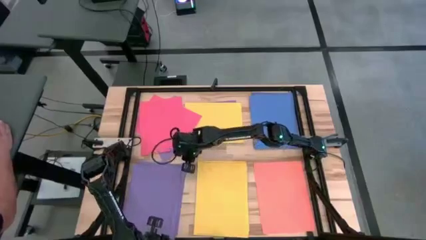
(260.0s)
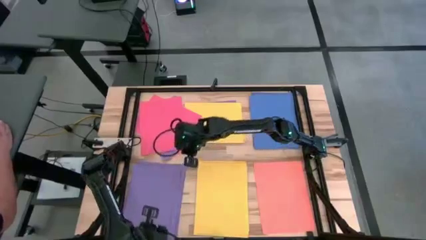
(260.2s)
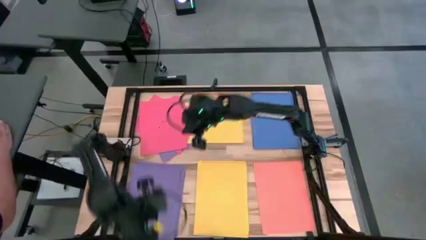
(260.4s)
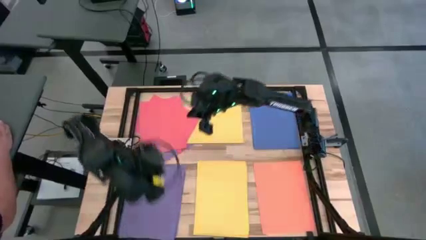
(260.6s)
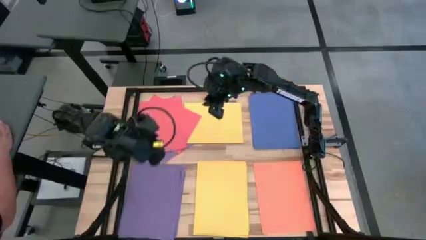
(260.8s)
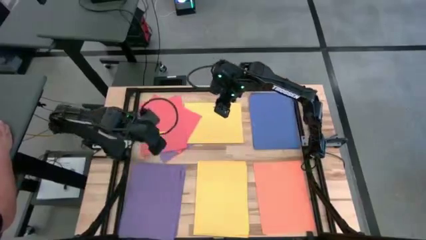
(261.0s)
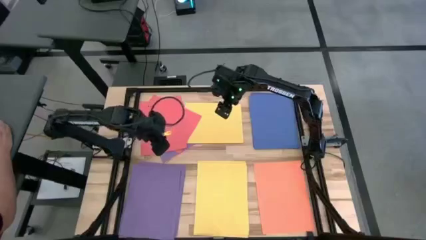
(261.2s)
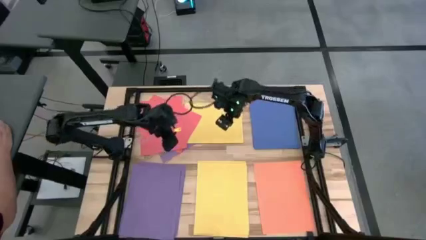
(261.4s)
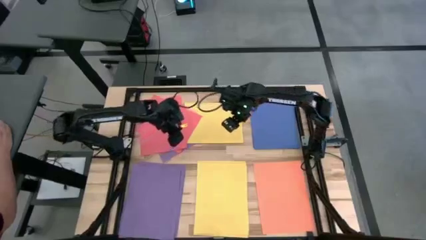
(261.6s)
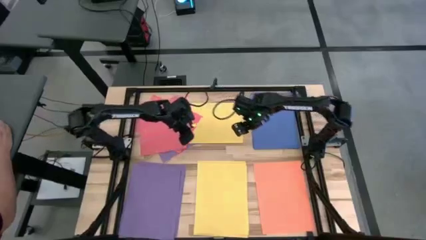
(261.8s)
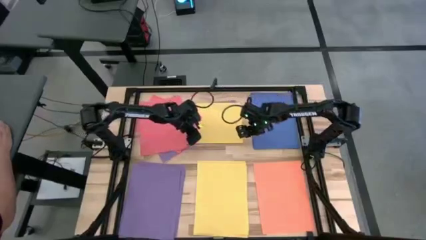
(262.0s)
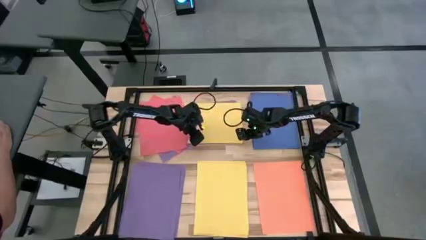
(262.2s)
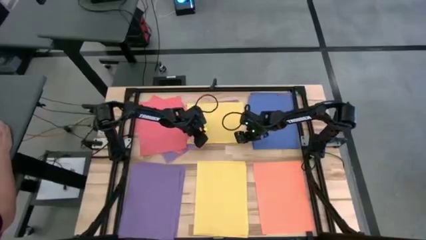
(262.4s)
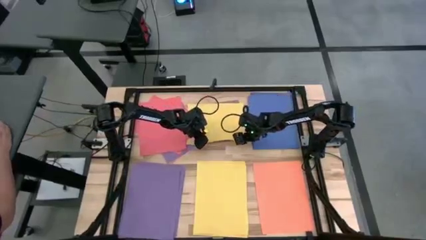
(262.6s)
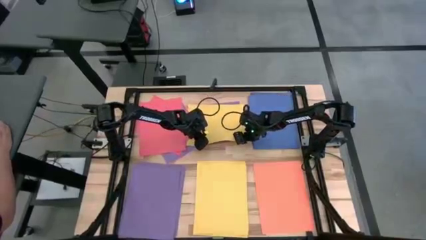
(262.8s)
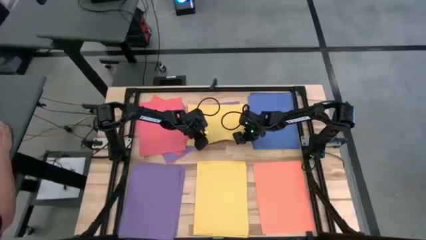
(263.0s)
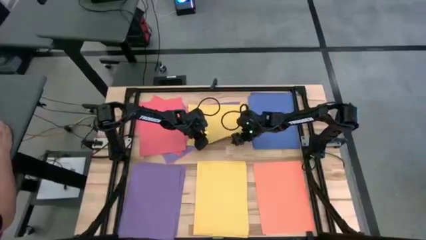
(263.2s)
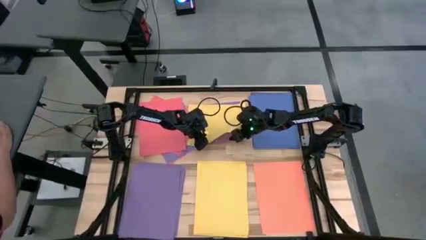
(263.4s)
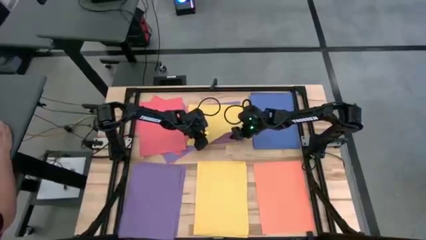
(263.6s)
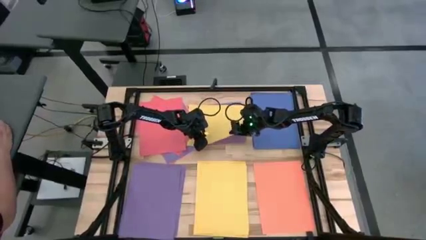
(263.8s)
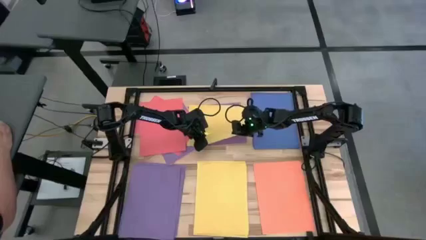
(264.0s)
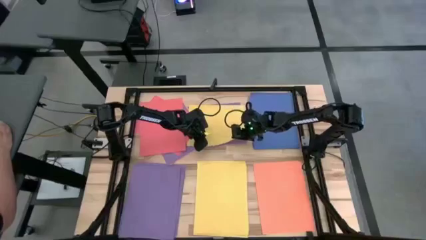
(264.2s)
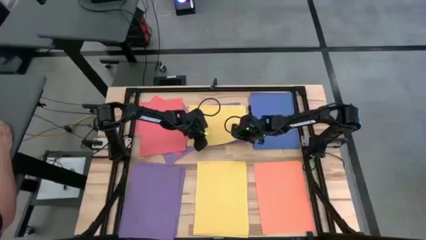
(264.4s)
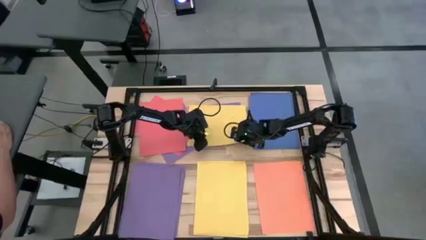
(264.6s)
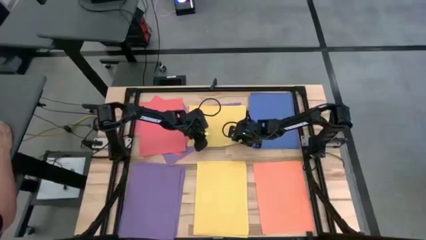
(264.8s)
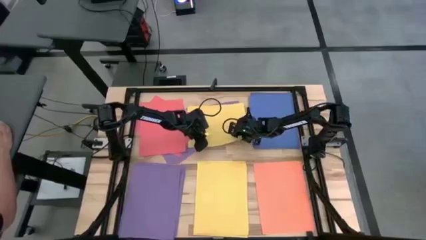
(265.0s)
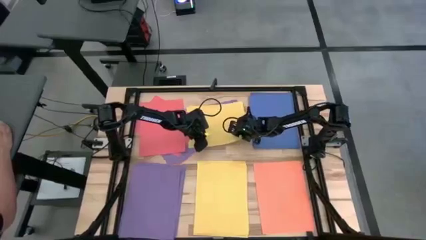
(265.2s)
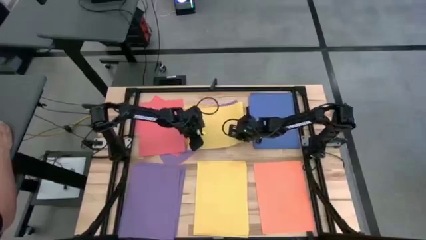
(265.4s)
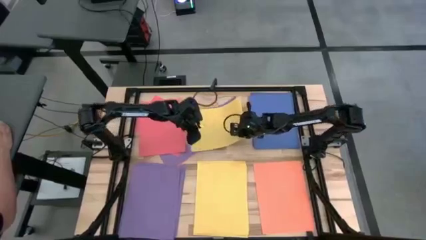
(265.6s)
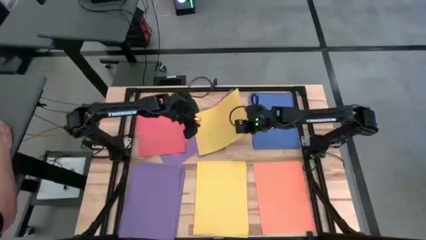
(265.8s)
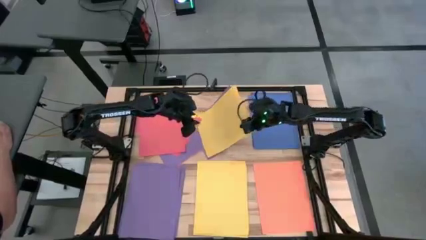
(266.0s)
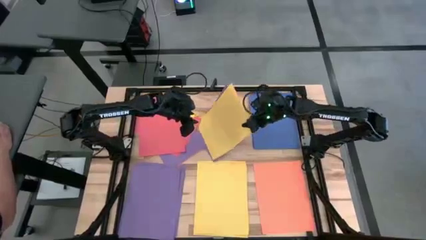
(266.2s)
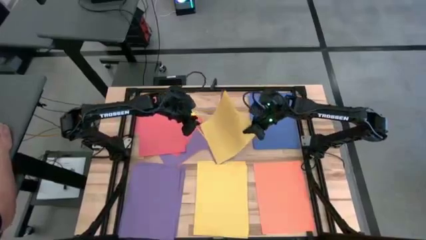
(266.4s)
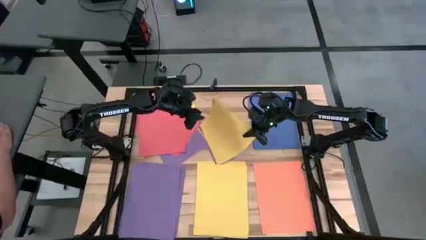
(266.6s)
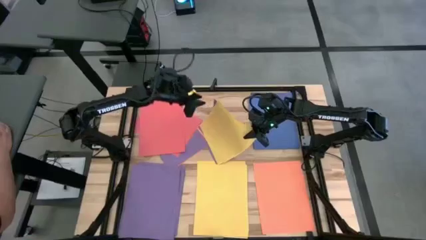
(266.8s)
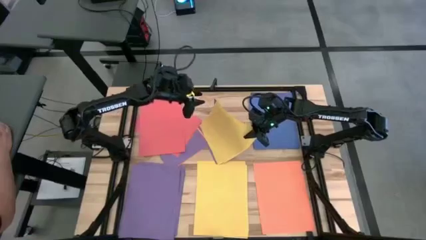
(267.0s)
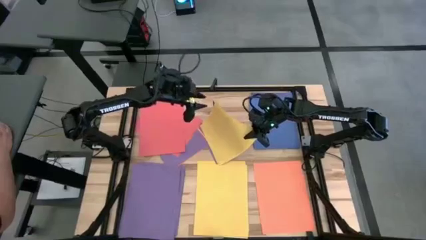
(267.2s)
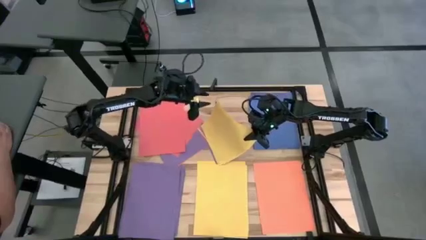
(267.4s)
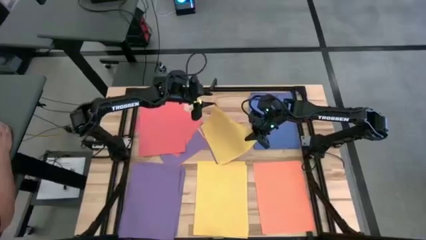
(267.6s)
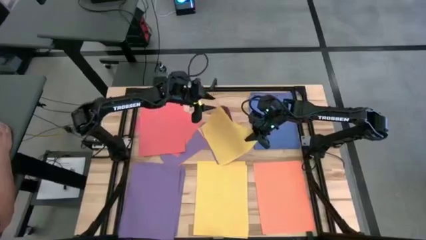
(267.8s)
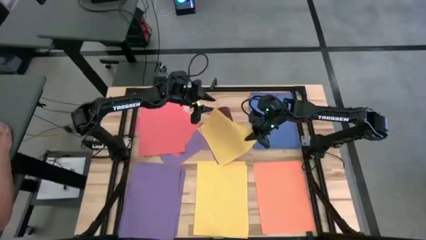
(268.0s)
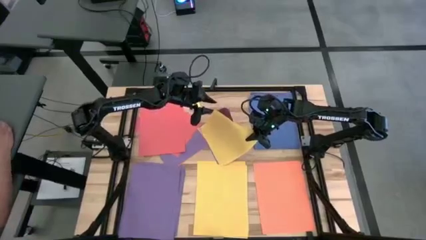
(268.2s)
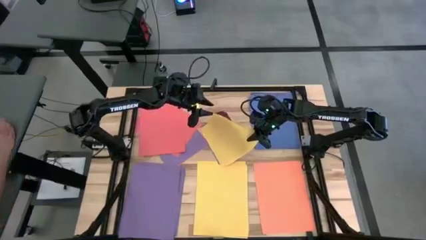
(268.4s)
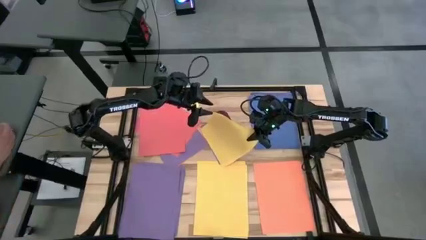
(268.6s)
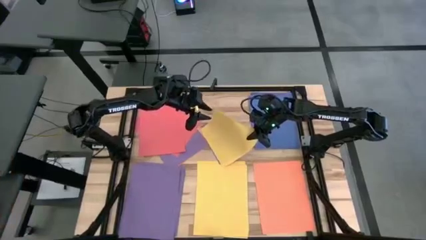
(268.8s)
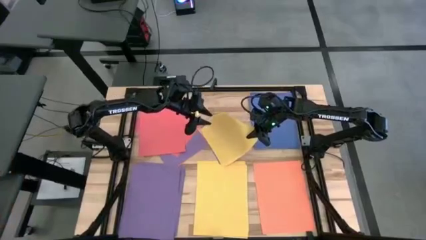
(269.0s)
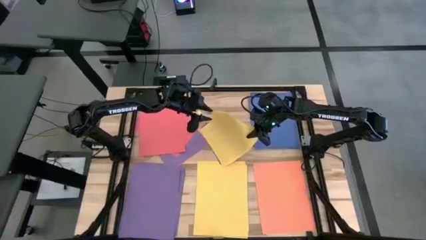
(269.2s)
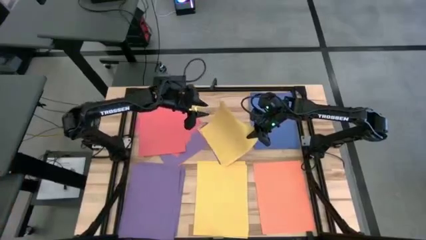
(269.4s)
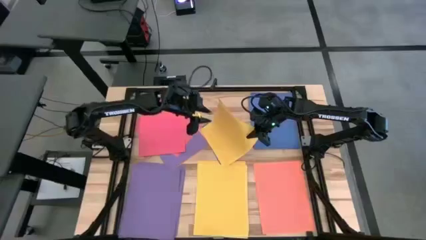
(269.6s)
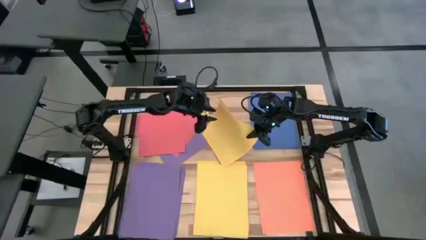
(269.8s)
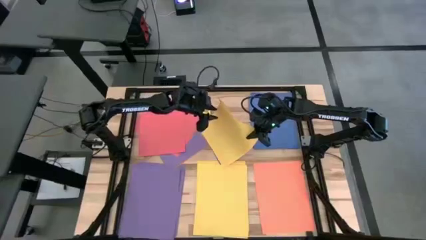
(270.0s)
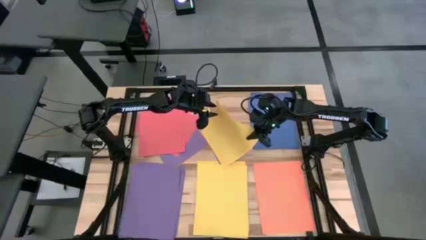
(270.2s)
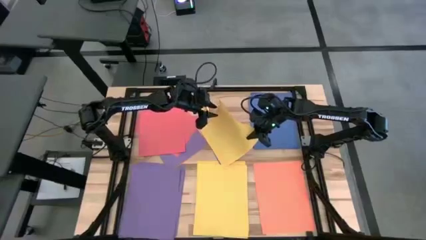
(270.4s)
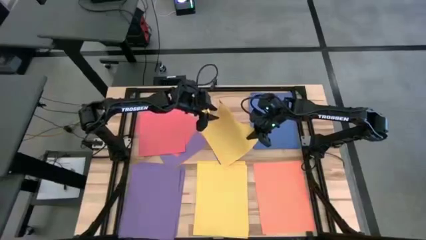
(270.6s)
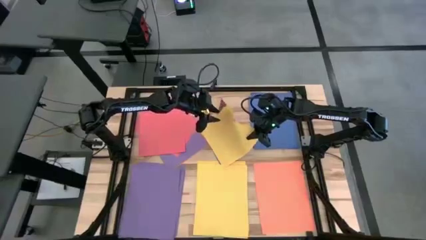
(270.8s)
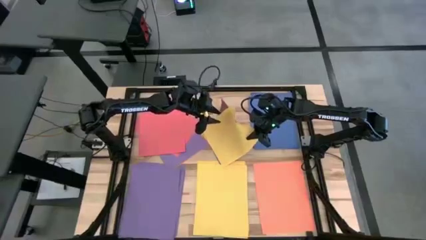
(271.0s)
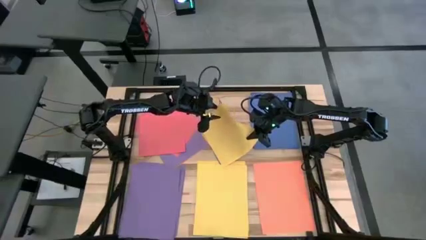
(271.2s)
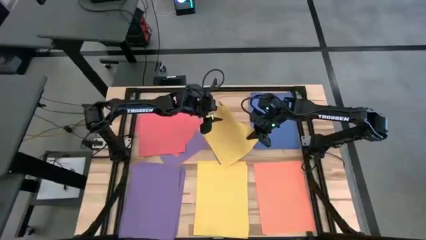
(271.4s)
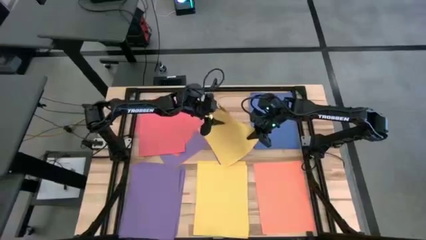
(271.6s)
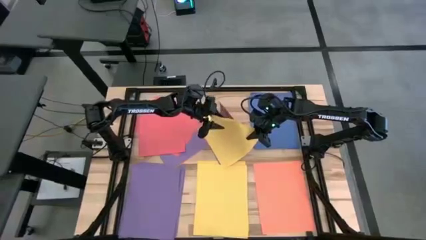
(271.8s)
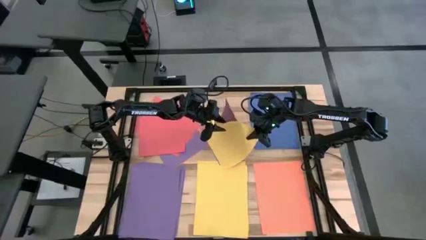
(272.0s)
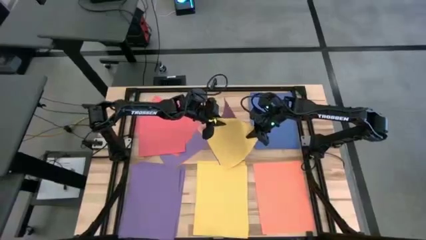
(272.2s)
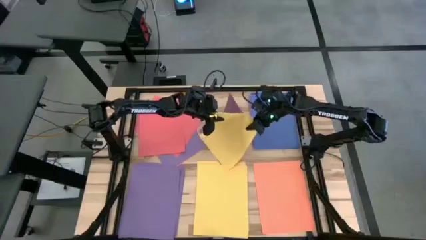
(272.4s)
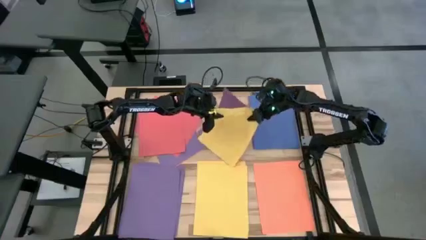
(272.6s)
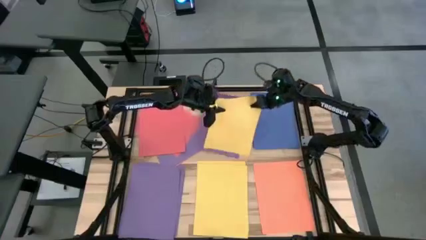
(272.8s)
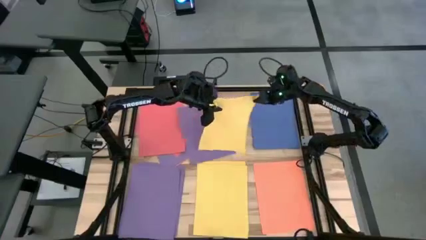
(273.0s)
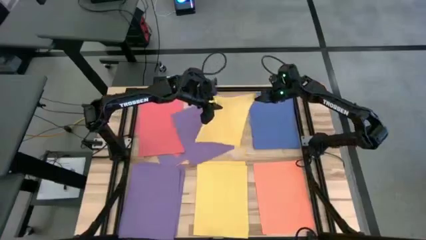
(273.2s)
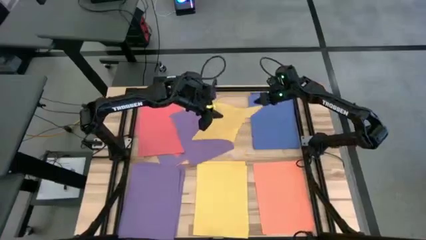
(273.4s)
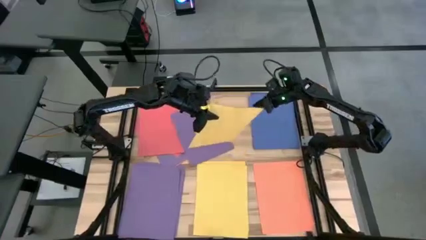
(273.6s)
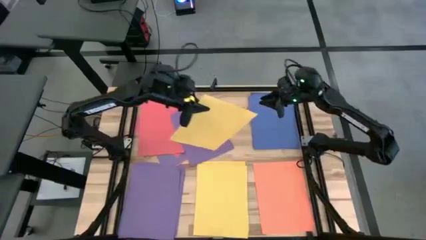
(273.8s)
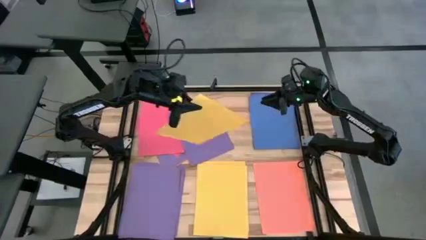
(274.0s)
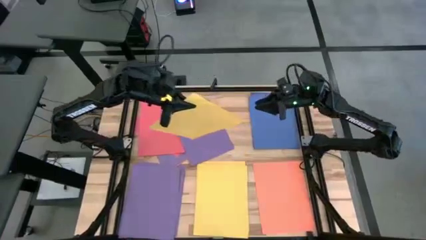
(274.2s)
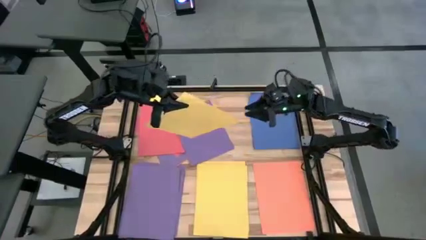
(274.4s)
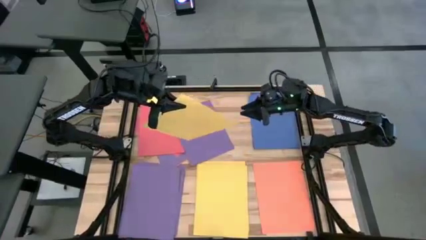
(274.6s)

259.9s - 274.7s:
Task: Organize paper
Stack the yellow paper on top of the yellow paper
